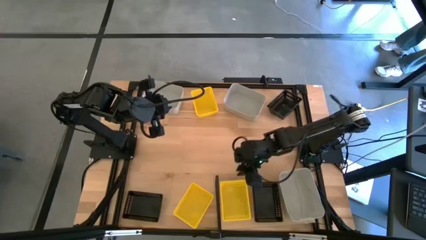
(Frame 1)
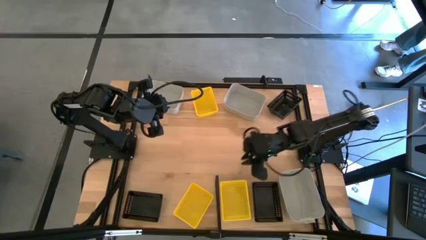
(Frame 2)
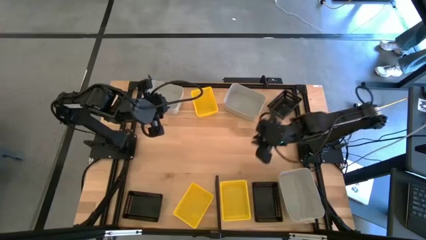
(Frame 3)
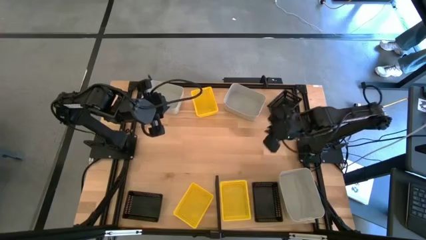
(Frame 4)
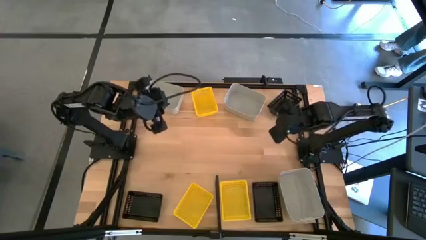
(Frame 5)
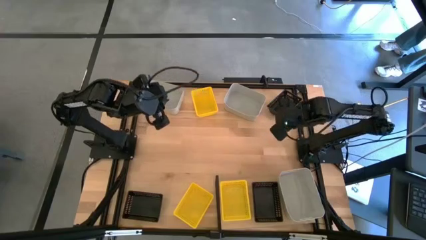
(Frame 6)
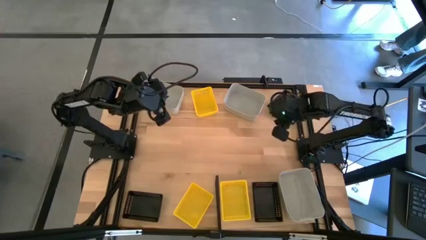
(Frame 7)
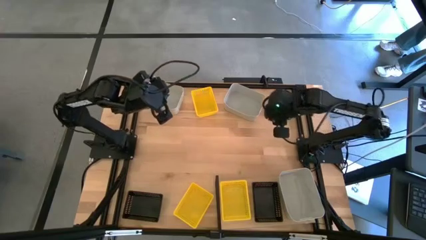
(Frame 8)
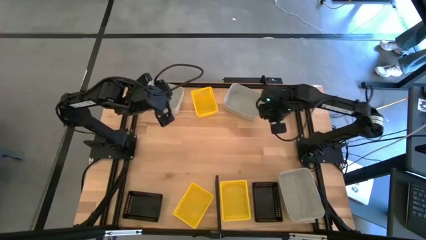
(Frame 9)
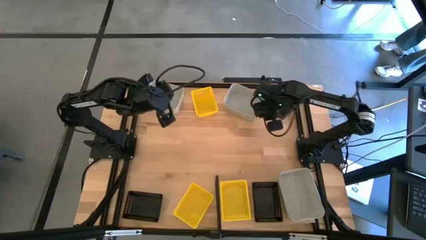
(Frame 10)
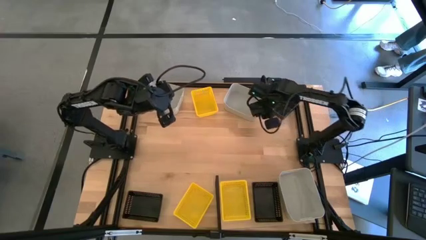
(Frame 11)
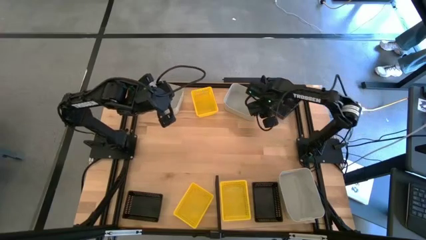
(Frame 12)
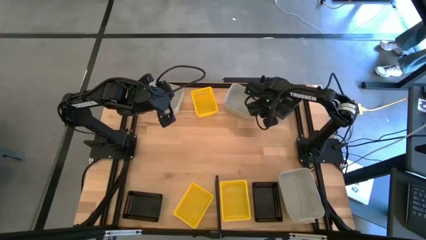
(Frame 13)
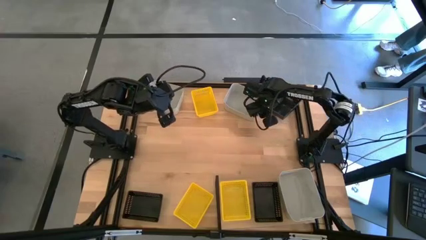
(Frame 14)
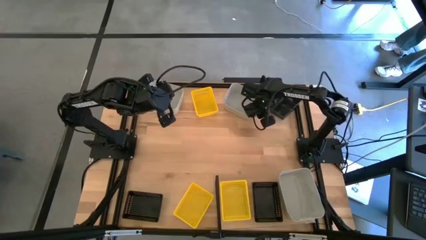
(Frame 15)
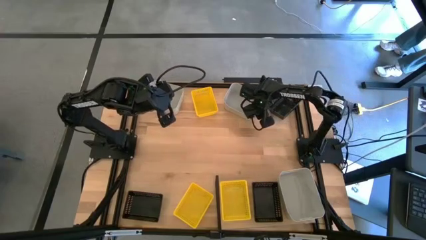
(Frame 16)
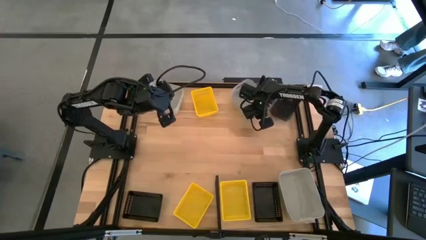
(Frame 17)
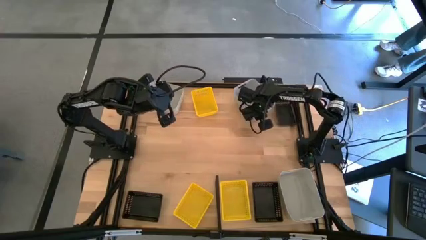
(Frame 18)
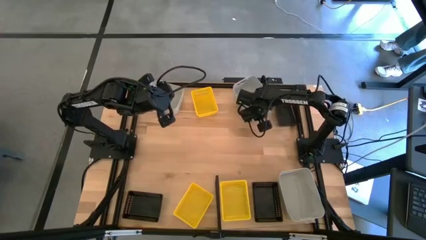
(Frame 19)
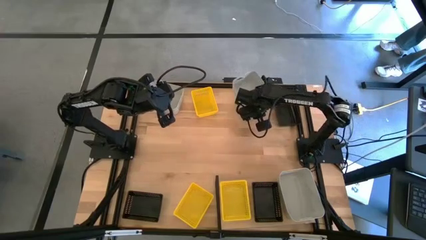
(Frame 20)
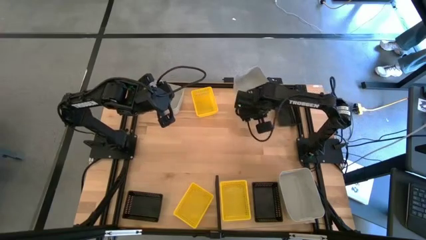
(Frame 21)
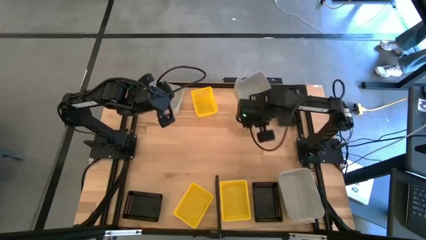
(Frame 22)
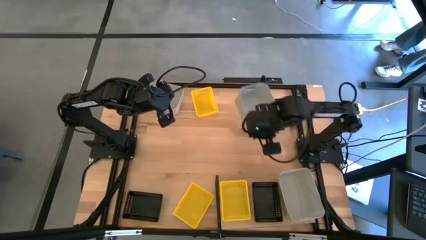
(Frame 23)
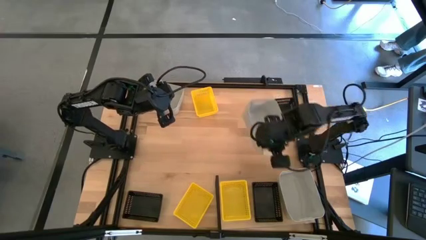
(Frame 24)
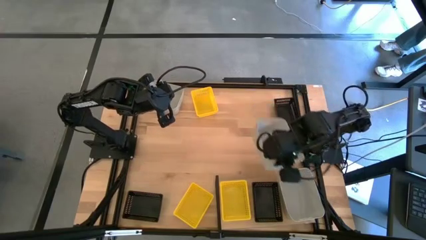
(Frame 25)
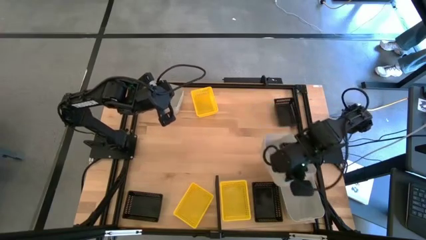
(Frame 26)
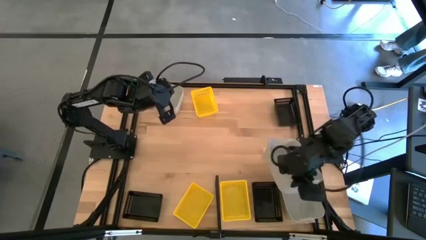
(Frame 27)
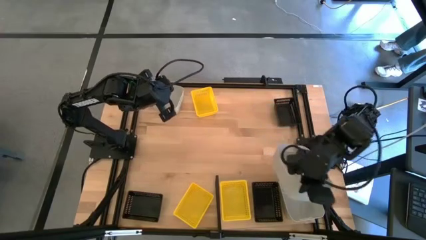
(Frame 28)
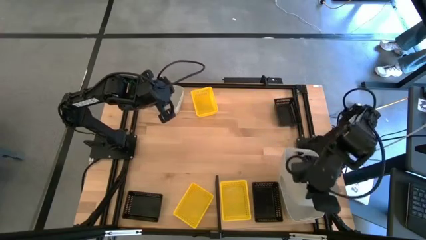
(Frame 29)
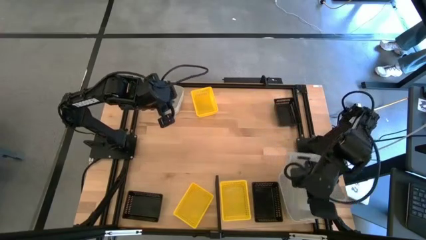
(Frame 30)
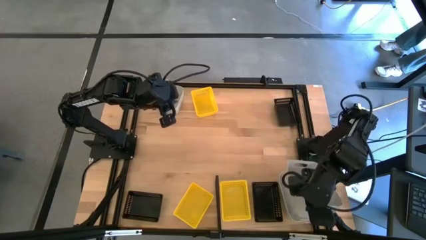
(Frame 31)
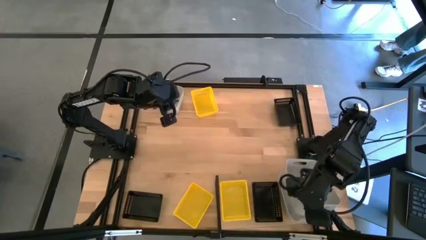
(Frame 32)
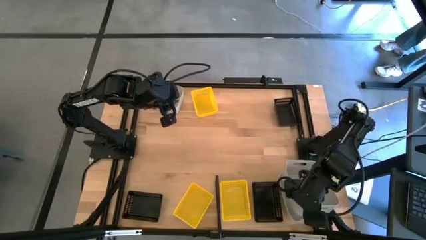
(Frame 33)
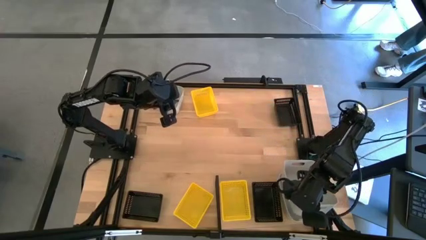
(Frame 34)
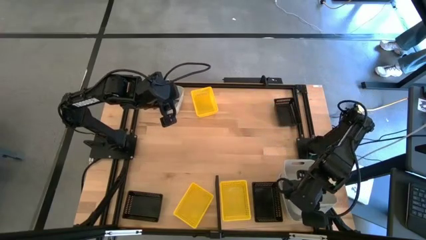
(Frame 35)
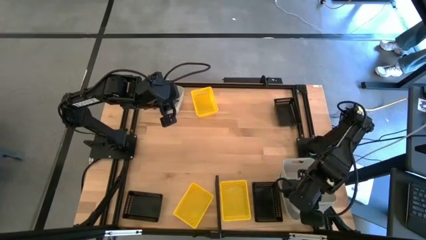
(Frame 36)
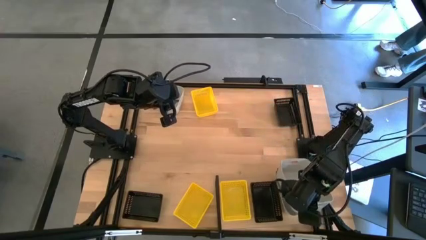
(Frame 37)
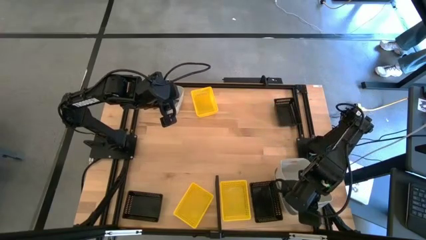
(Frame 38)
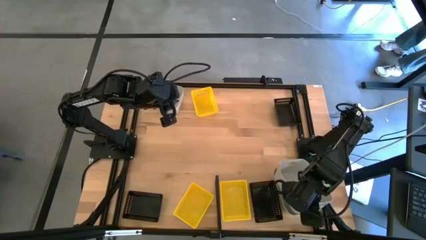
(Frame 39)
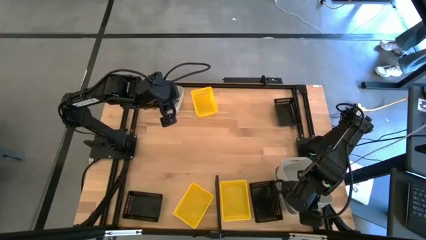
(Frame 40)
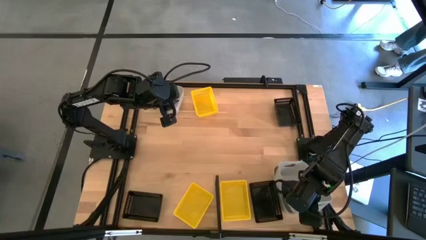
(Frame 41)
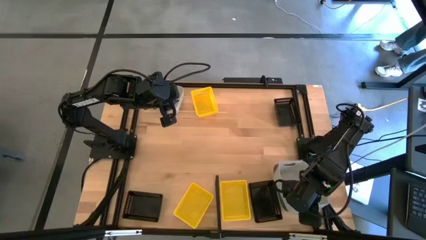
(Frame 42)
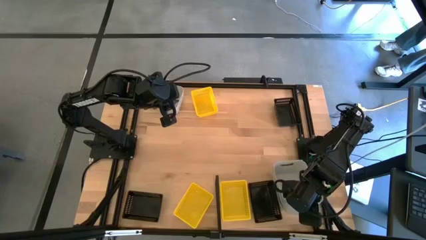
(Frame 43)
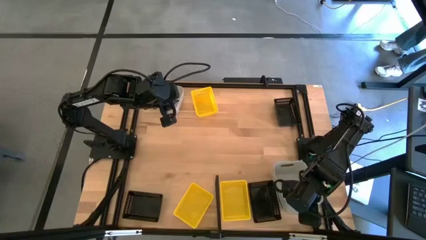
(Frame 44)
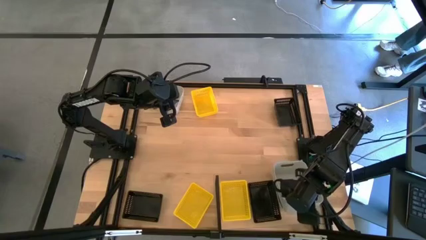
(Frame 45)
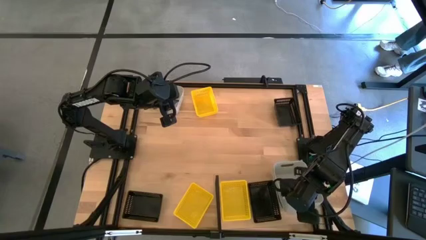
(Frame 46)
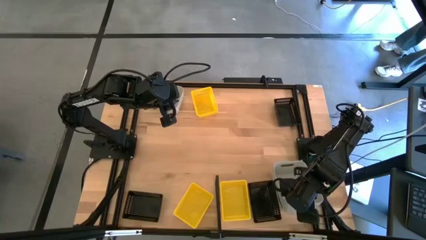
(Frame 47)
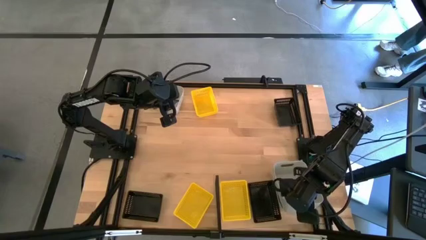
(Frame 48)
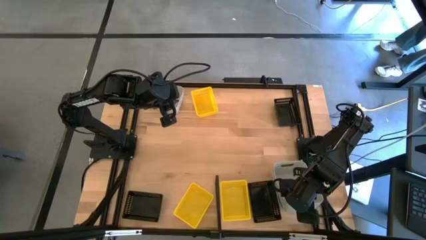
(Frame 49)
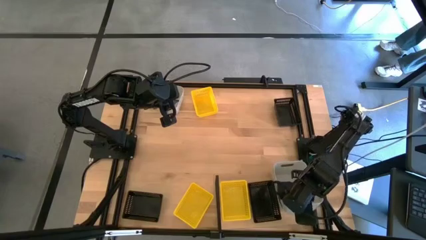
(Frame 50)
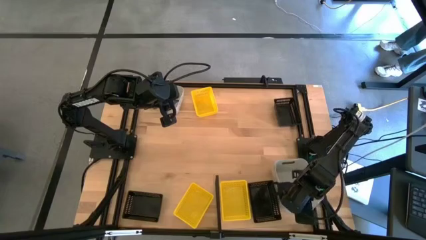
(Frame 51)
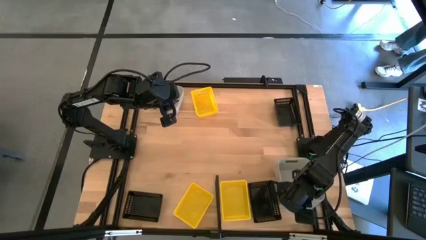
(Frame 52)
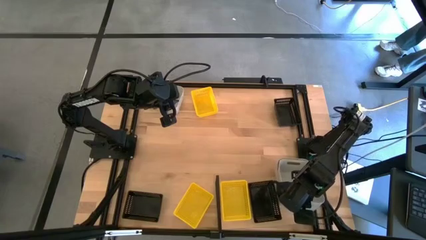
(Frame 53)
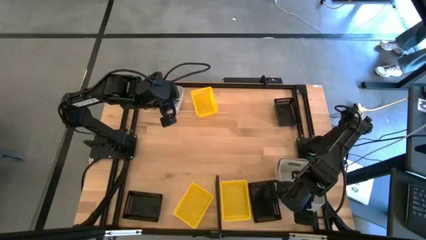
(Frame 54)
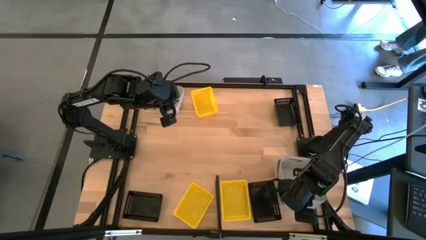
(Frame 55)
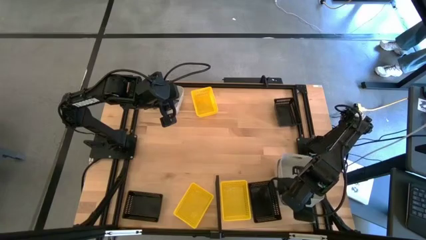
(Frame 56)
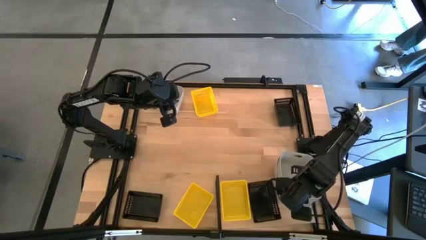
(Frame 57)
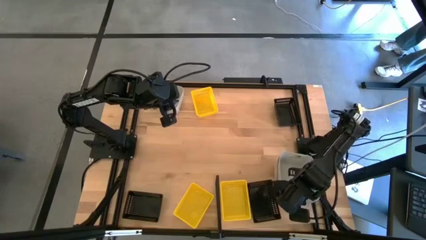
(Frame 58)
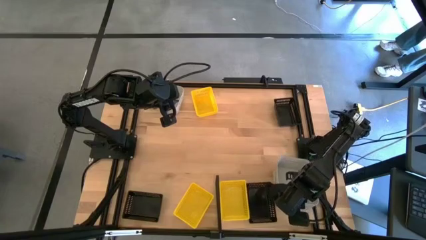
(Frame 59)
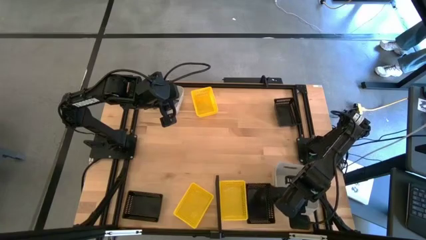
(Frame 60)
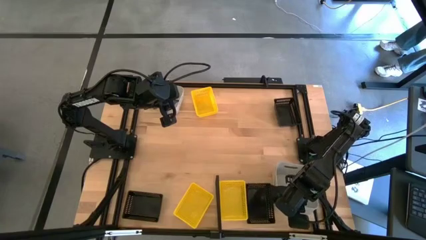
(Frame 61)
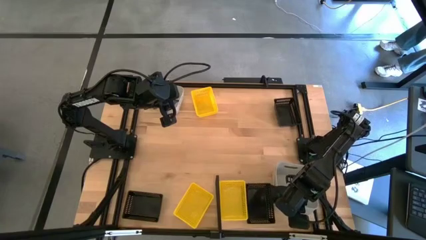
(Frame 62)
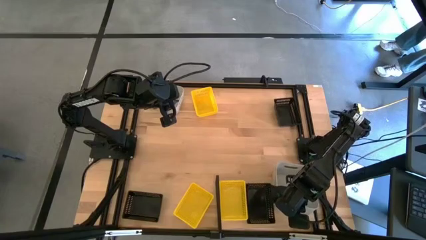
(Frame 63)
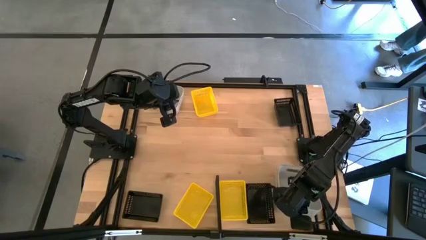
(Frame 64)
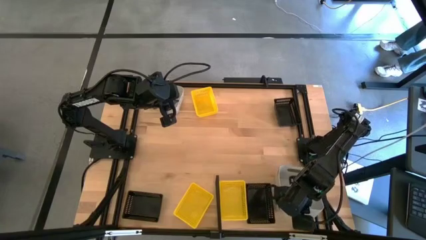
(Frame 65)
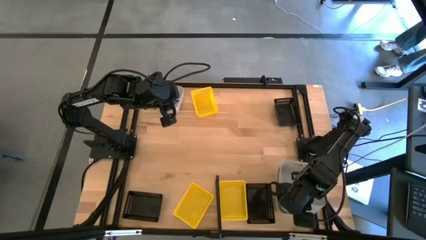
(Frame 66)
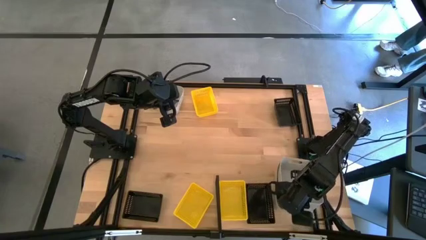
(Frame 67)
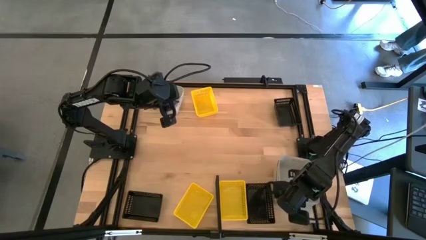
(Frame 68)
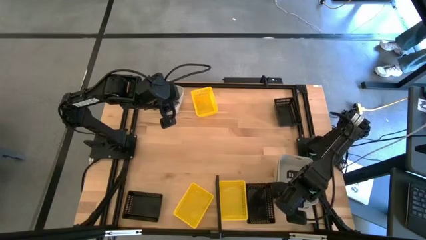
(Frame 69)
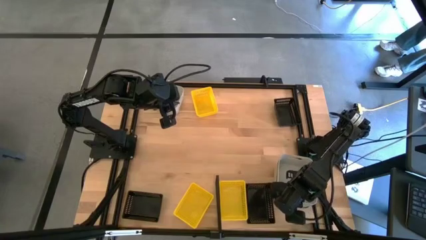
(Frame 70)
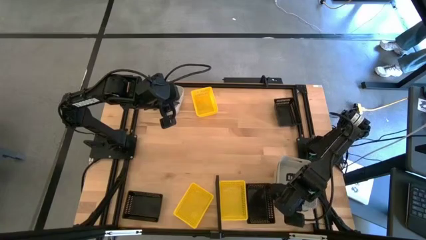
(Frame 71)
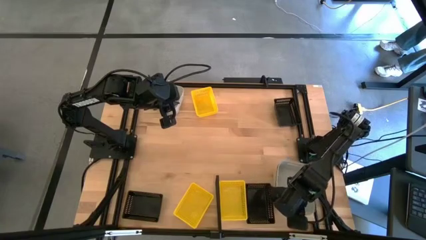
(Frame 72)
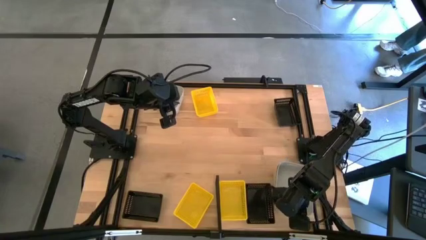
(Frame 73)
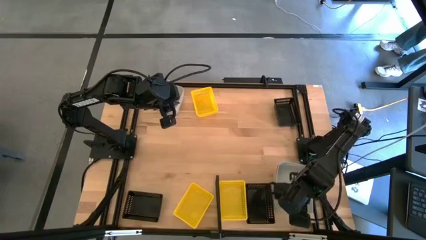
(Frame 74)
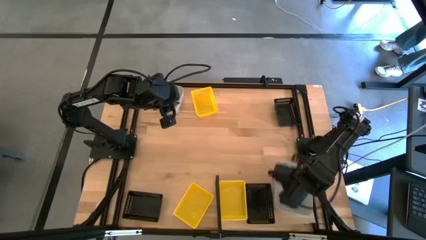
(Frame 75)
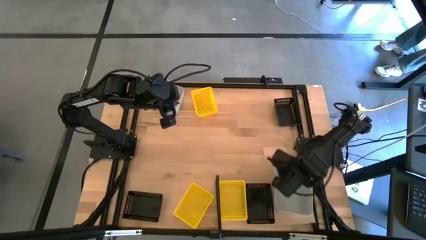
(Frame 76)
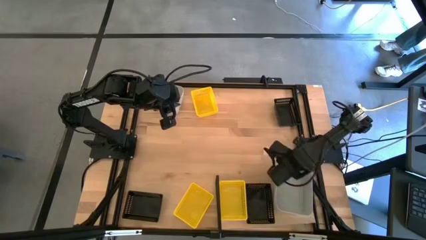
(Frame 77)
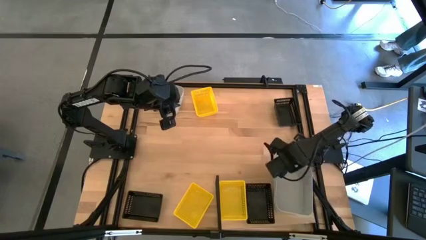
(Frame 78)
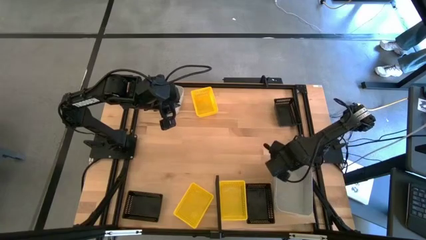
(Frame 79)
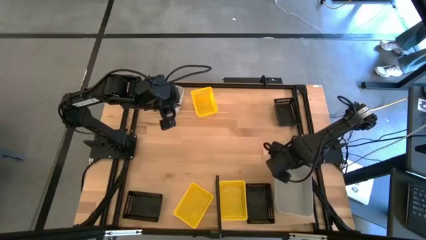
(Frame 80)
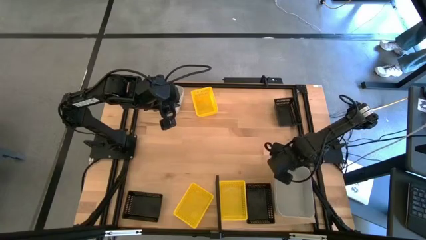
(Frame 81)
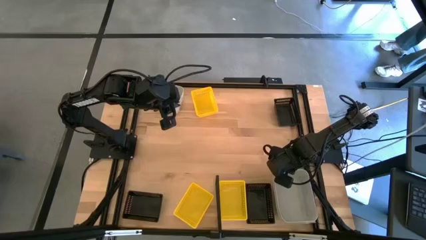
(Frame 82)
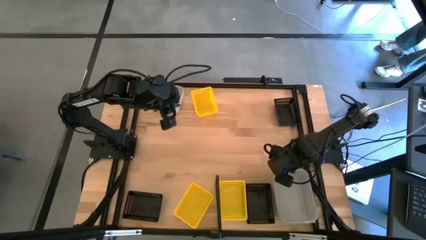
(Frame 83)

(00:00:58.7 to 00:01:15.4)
Task: Stack baskets on shelf by color
Stack the right gray bin on top of the gray bin on the shelf
